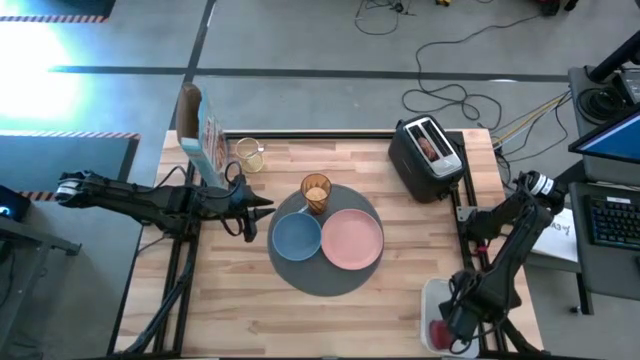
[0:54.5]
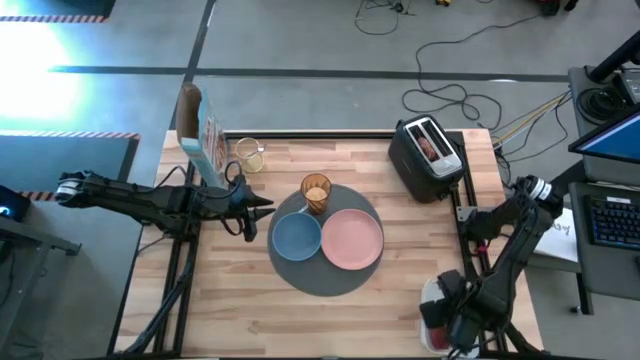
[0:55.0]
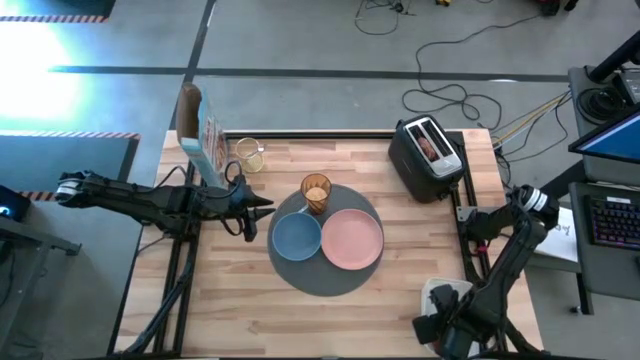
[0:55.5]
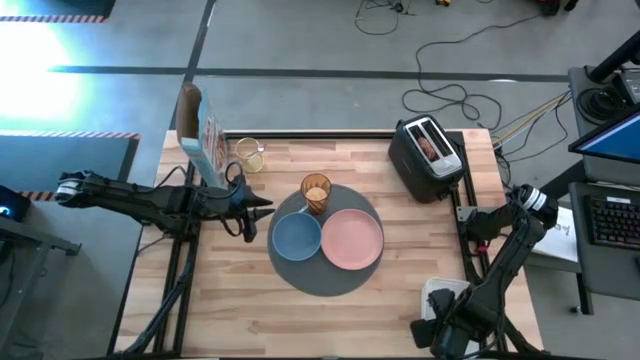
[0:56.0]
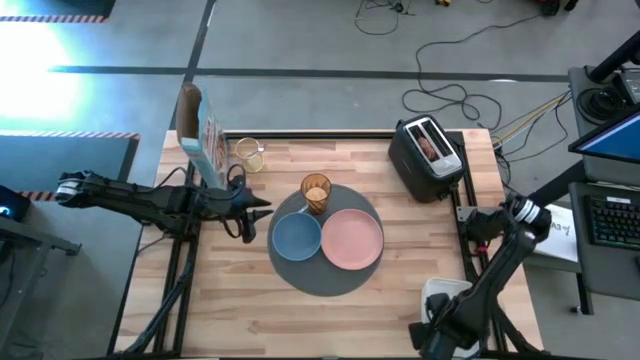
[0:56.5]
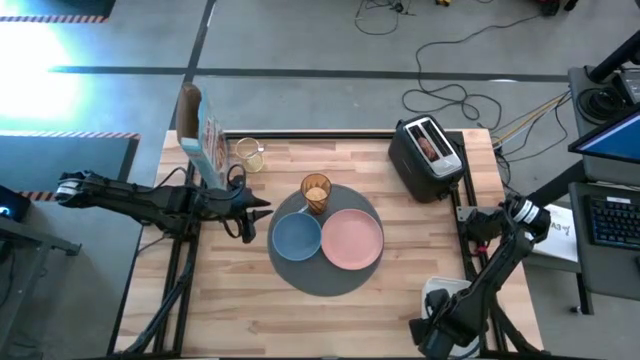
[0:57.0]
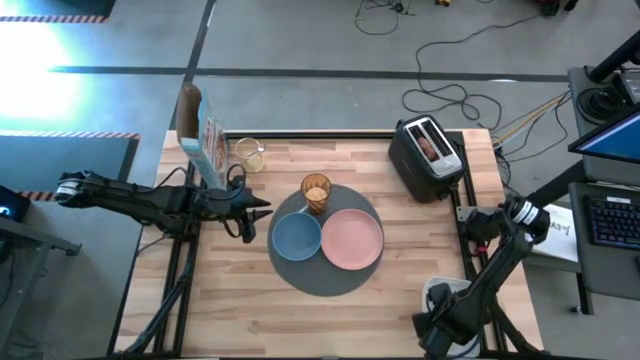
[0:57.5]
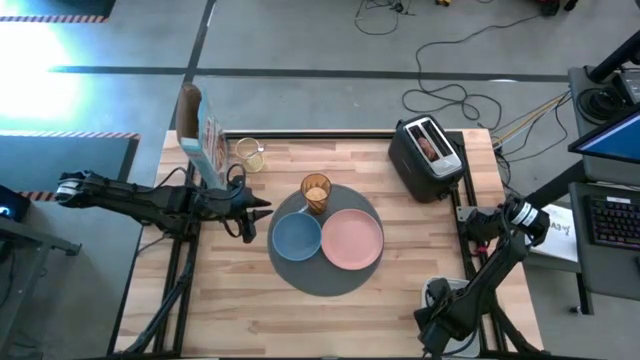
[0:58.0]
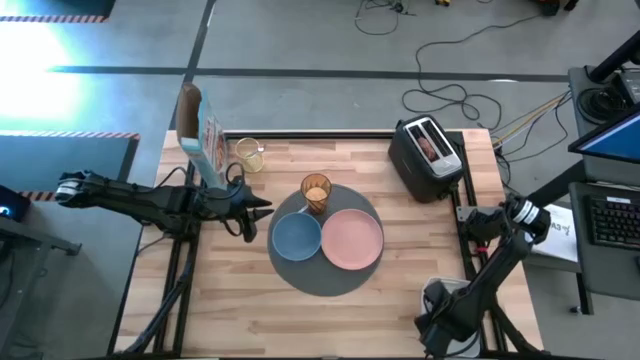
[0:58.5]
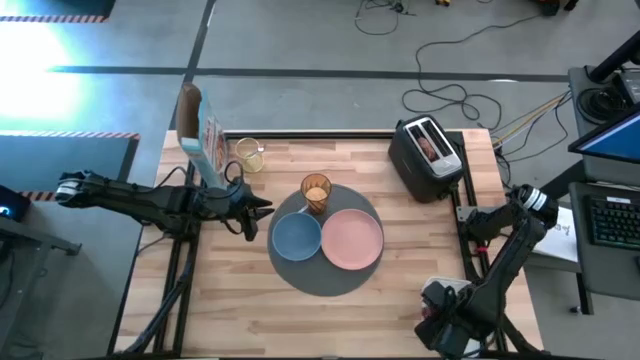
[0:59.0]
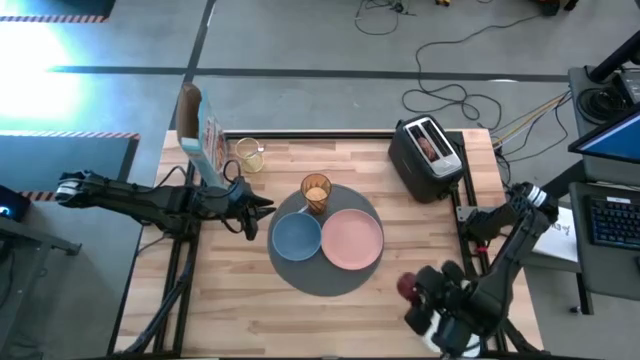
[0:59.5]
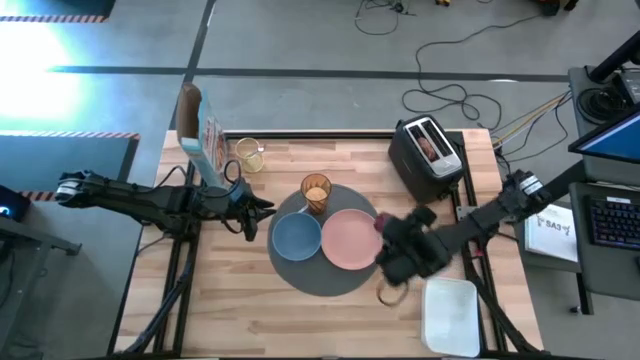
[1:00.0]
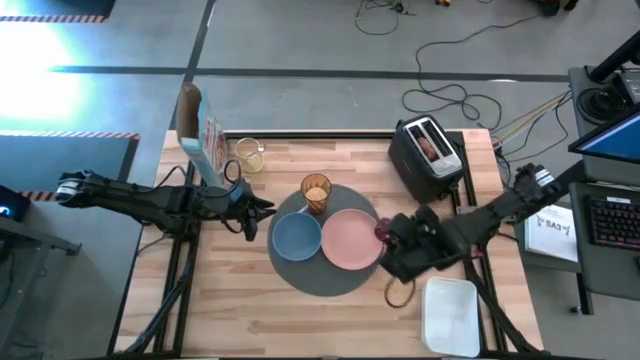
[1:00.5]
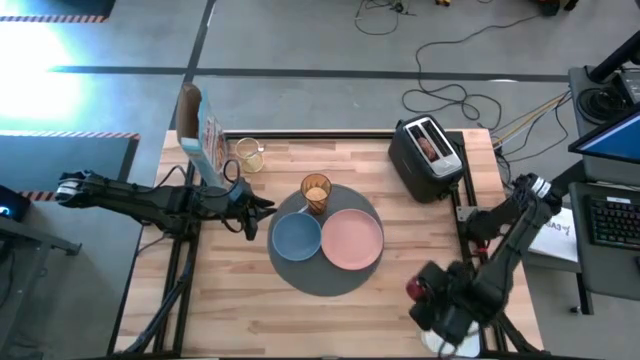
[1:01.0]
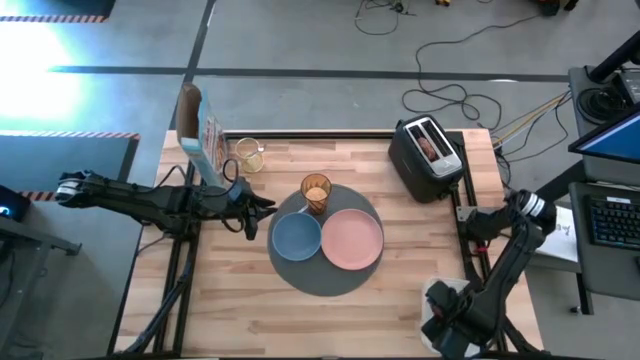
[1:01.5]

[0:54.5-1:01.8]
Task: Arrange a breakfast setting
Put the apple on the placemat

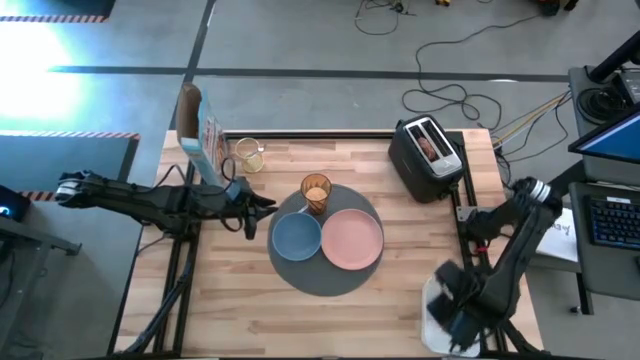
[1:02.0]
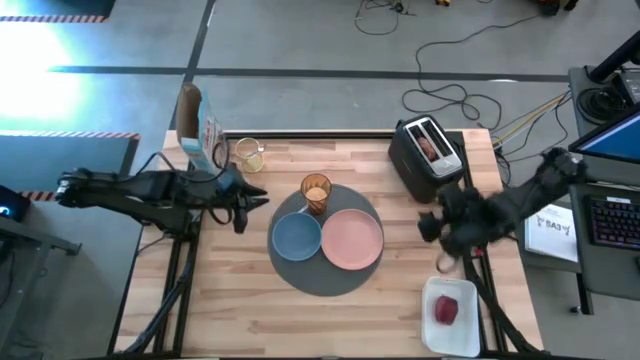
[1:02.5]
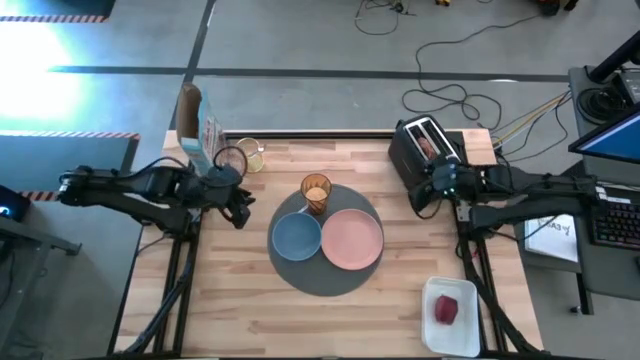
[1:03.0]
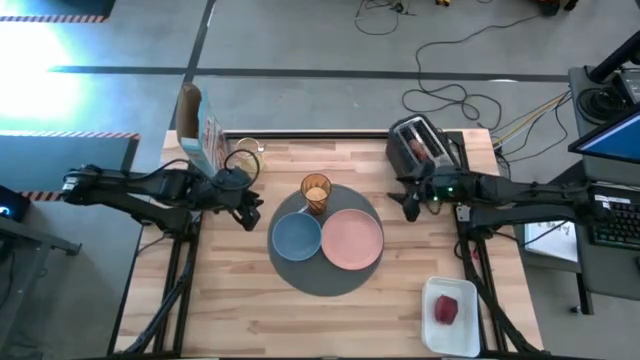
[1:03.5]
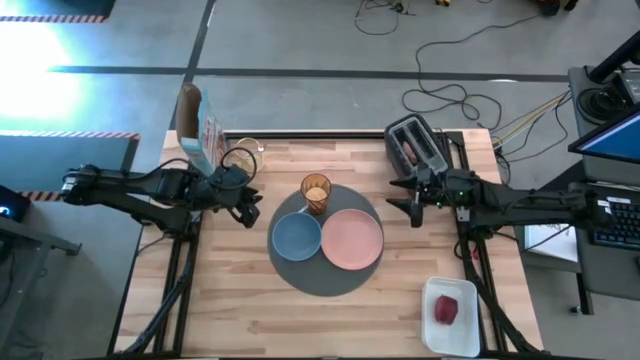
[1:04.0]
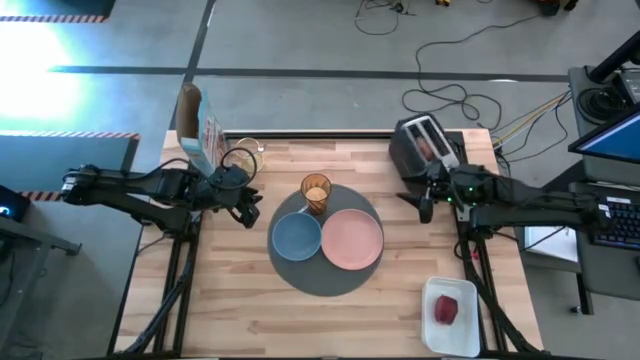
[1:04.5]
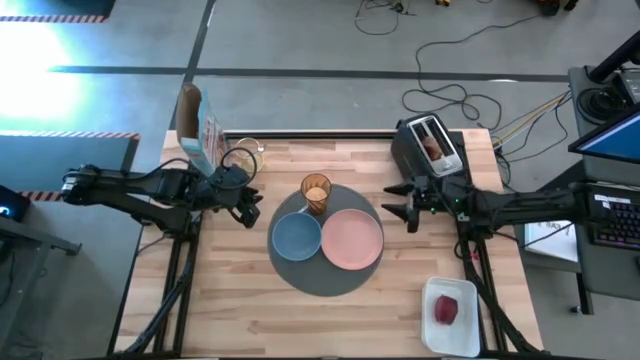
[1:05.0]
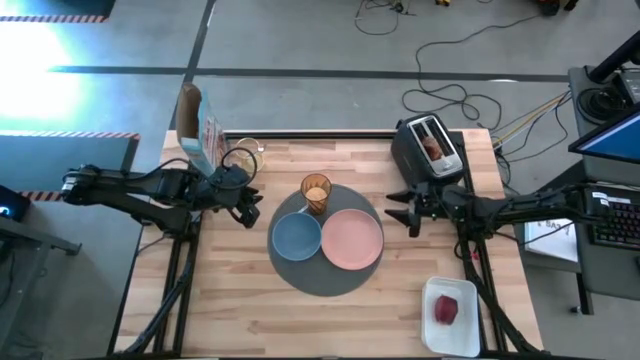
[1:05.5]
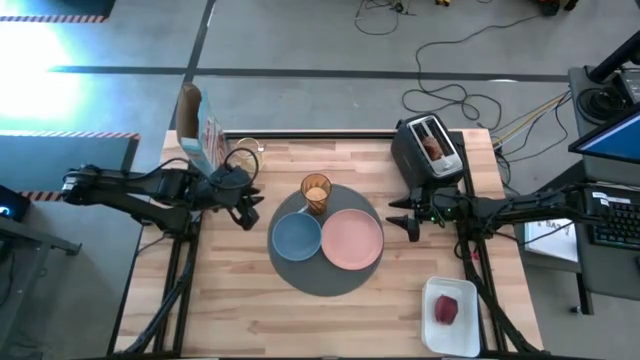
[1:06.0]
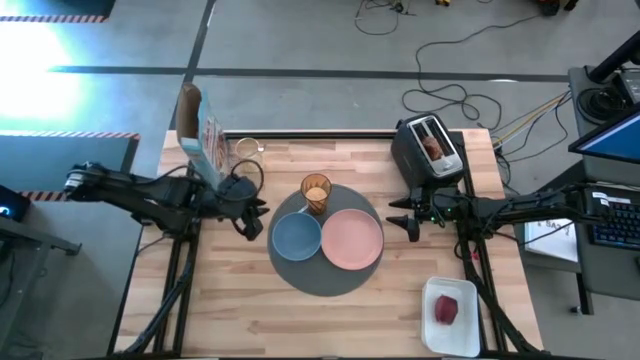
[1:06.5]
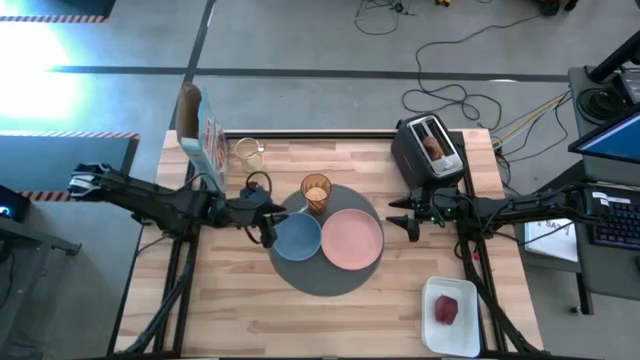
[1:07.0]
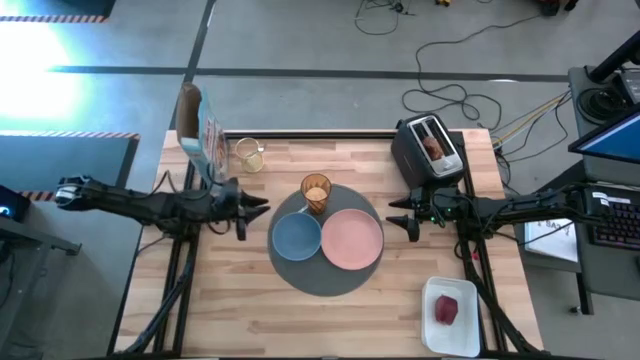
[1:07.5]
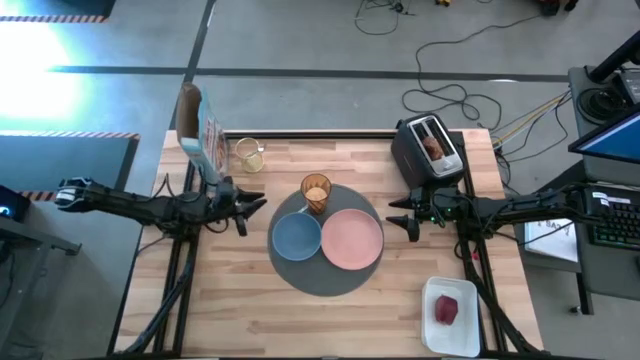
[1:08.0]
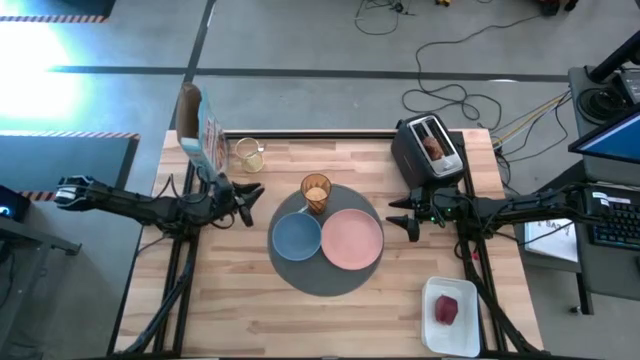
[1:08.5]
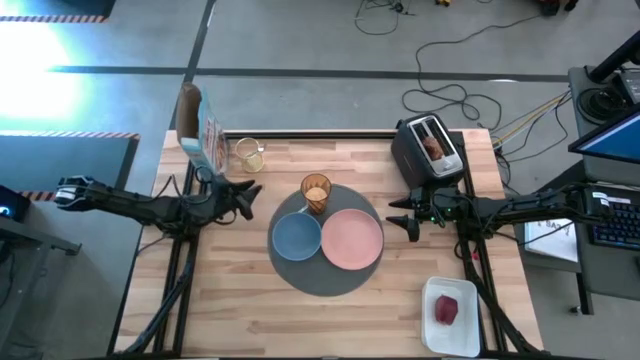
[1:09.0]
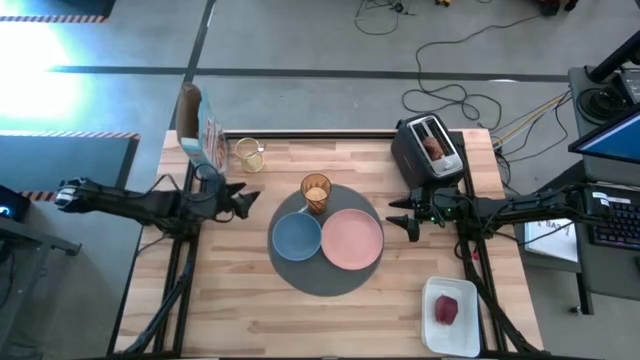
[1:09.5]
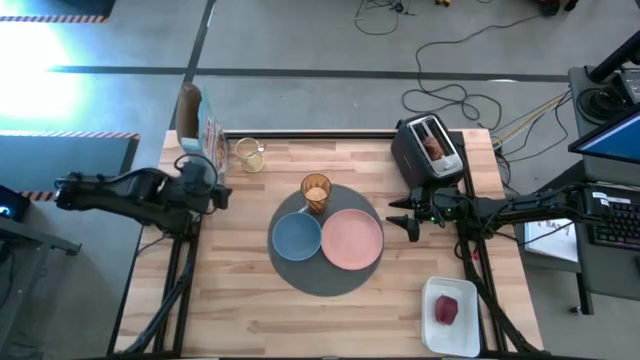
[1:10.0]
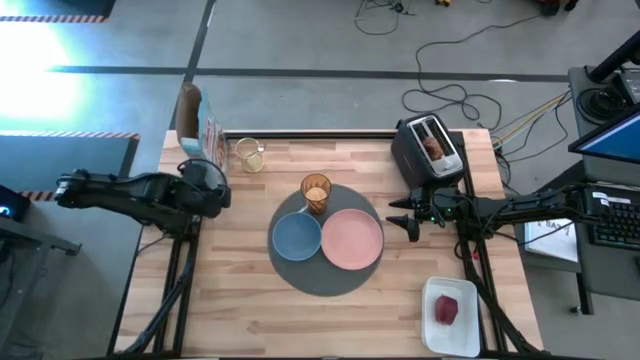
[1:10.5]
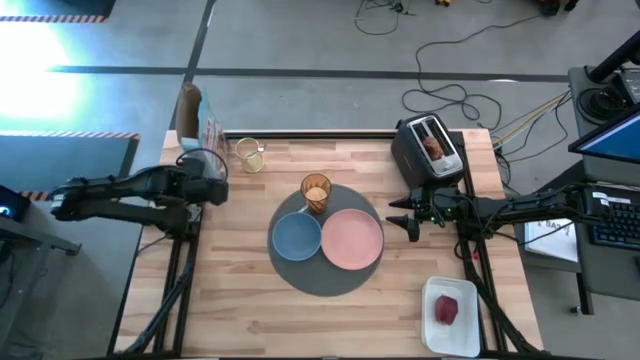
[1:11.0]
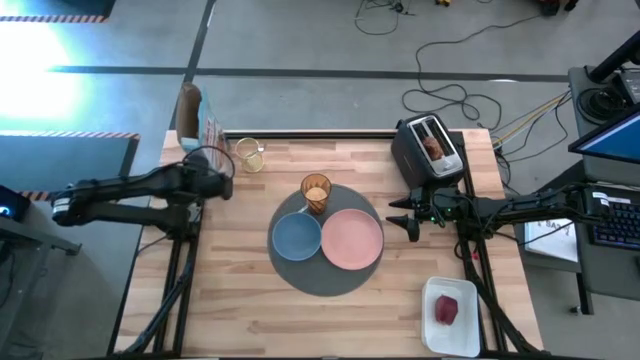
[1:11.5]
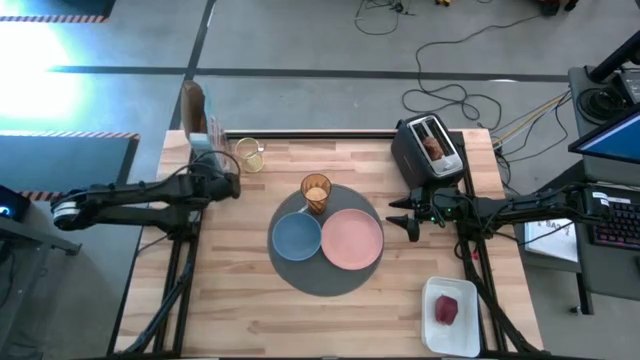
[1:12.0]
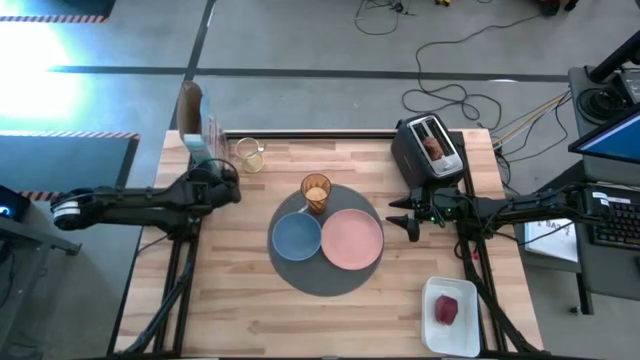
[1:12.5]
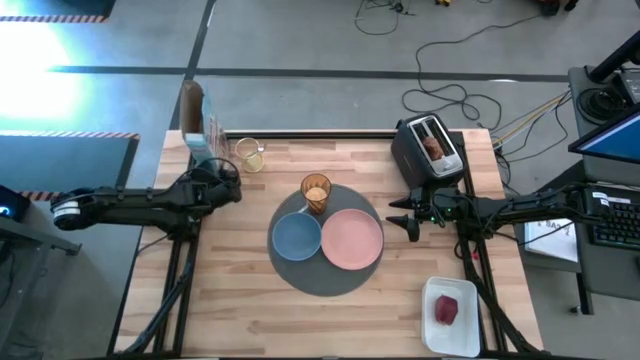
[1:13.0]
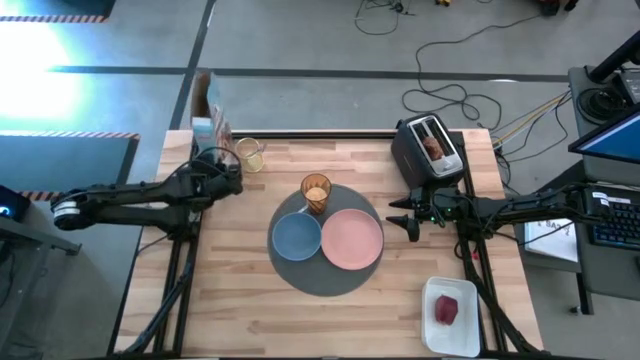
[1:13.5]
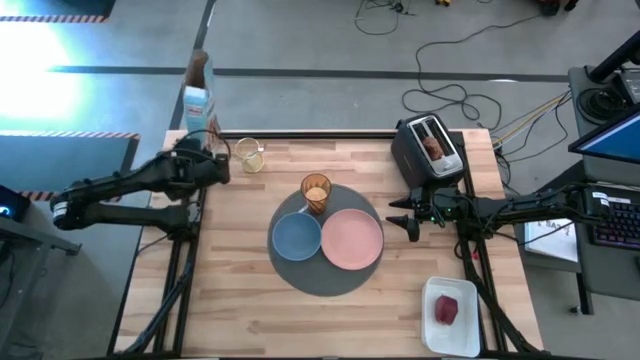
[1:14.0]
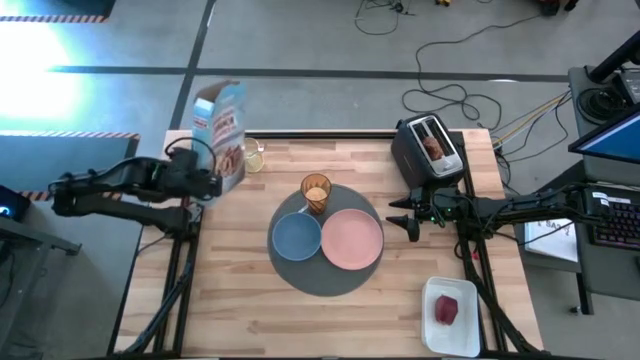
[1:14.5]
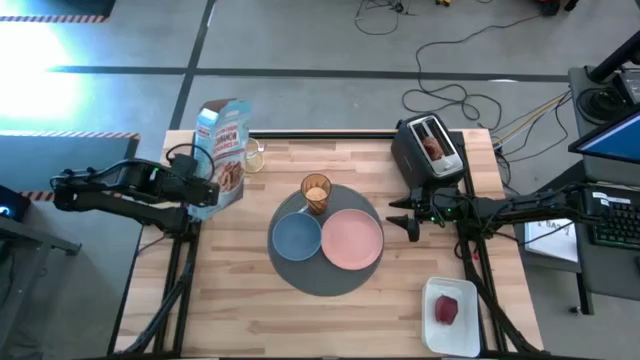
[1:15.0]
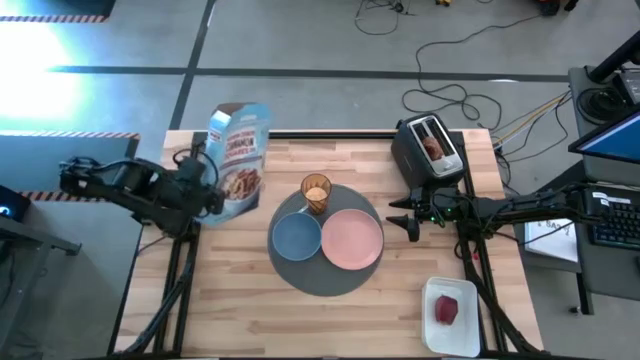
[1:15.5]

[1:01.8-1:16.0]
Pour the cereal into the blue bowl
